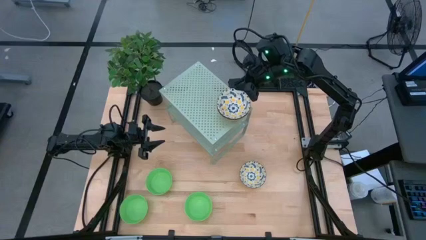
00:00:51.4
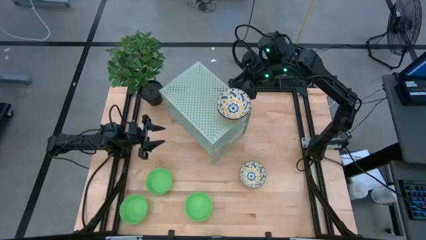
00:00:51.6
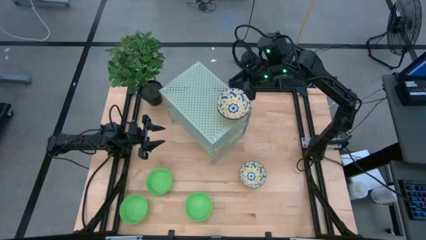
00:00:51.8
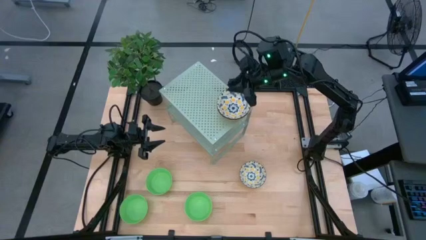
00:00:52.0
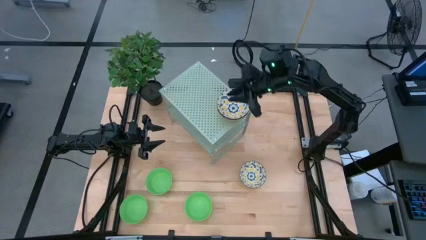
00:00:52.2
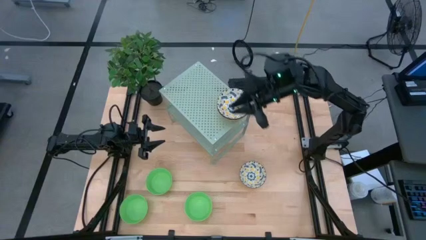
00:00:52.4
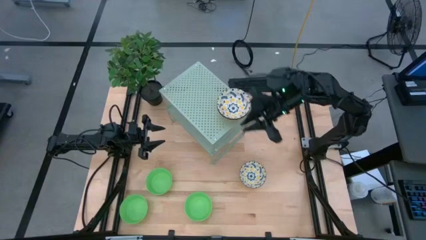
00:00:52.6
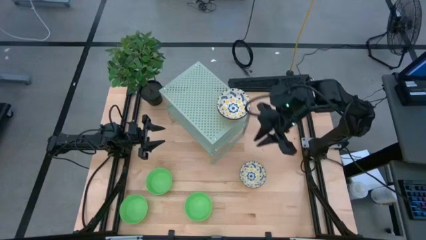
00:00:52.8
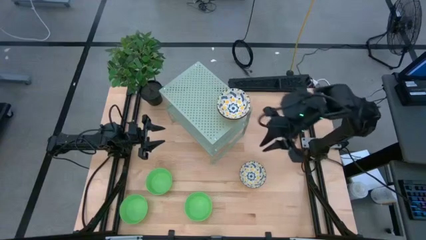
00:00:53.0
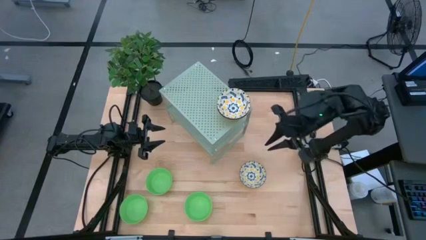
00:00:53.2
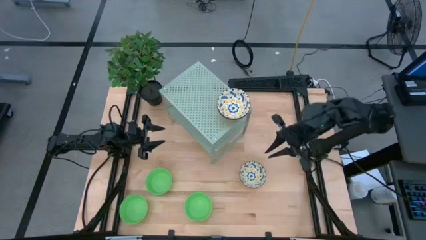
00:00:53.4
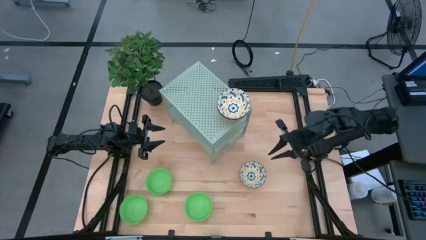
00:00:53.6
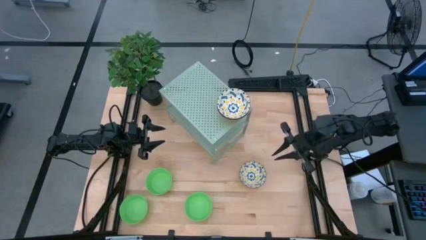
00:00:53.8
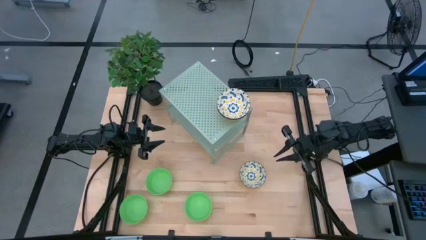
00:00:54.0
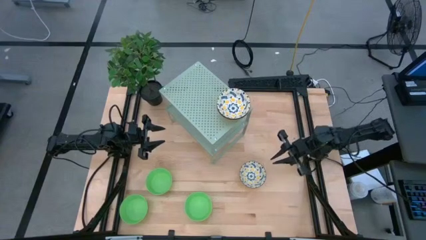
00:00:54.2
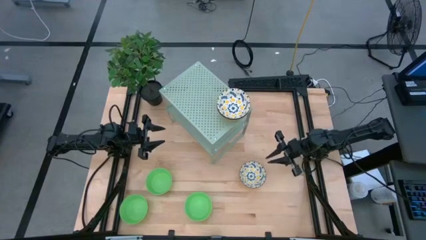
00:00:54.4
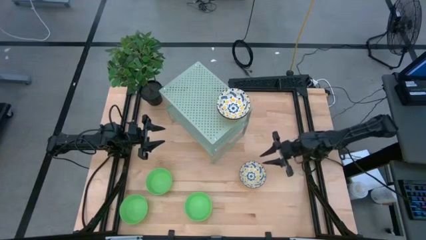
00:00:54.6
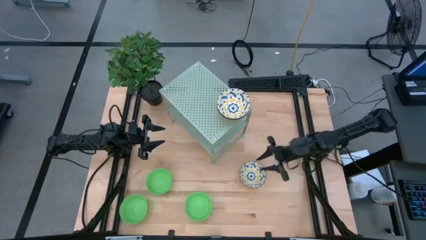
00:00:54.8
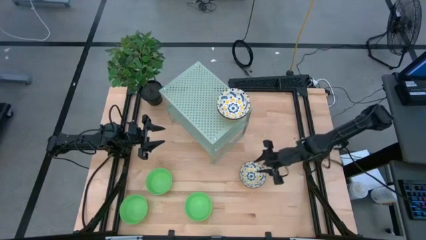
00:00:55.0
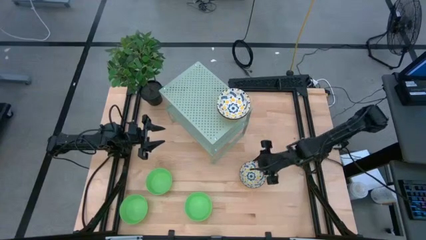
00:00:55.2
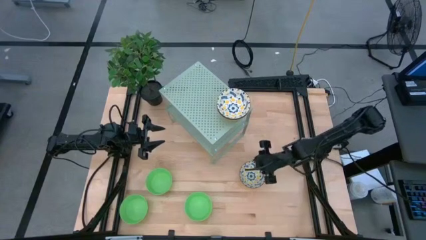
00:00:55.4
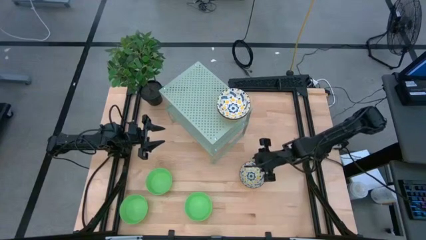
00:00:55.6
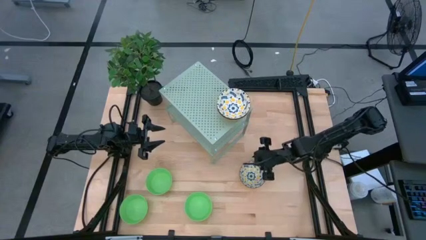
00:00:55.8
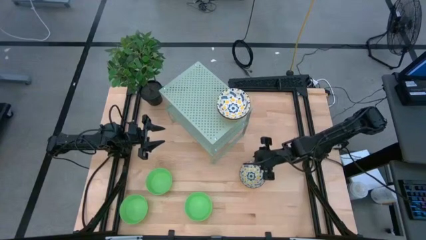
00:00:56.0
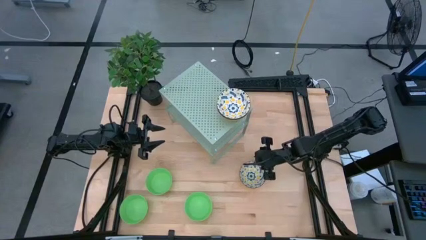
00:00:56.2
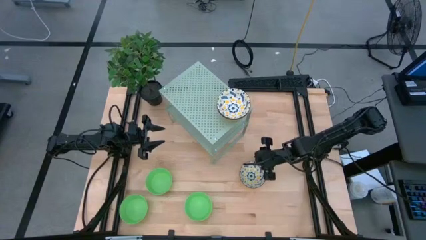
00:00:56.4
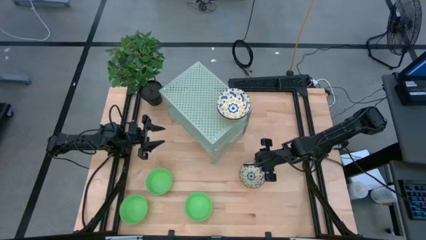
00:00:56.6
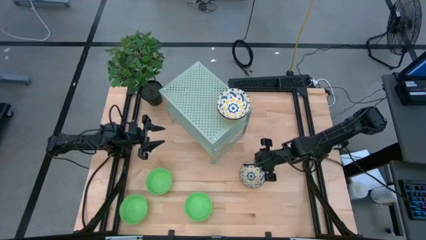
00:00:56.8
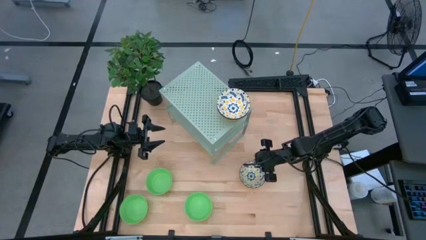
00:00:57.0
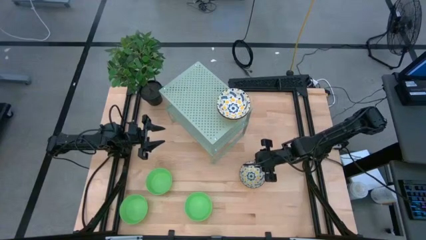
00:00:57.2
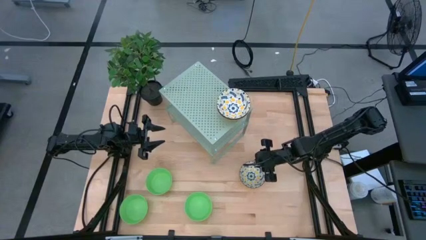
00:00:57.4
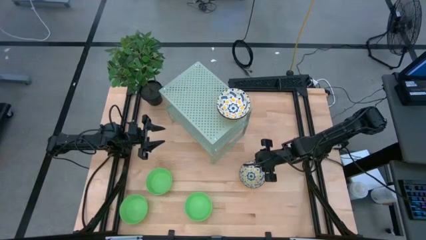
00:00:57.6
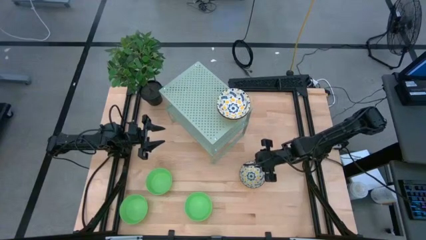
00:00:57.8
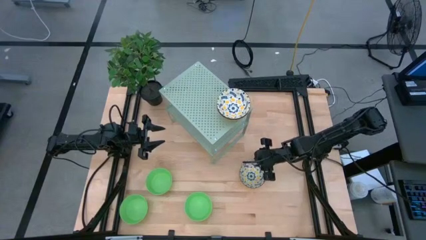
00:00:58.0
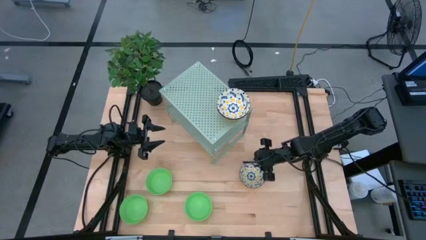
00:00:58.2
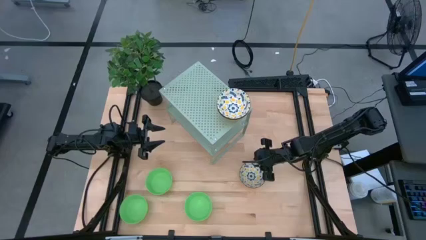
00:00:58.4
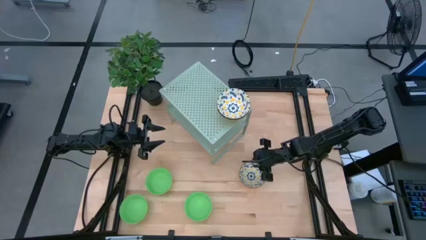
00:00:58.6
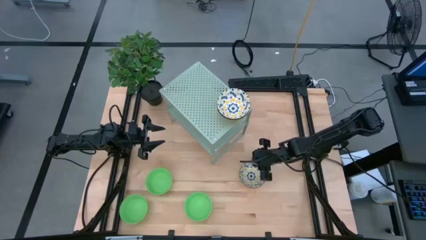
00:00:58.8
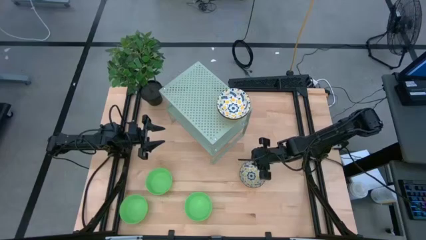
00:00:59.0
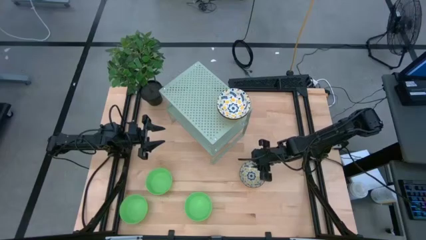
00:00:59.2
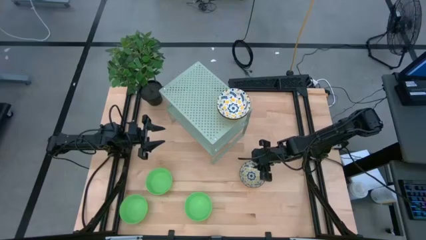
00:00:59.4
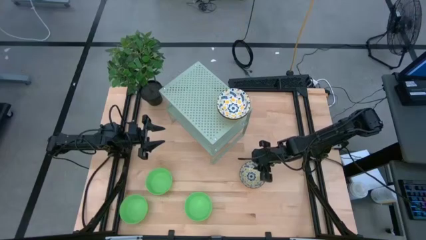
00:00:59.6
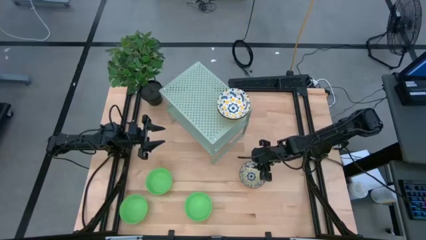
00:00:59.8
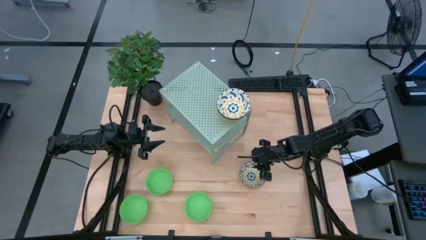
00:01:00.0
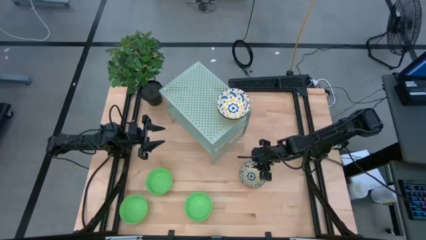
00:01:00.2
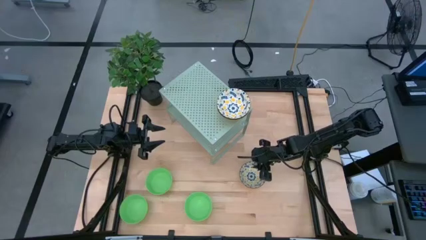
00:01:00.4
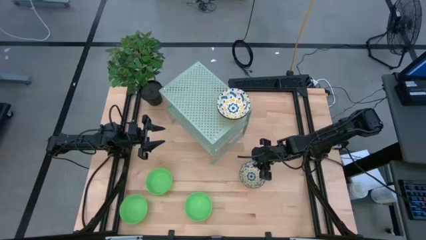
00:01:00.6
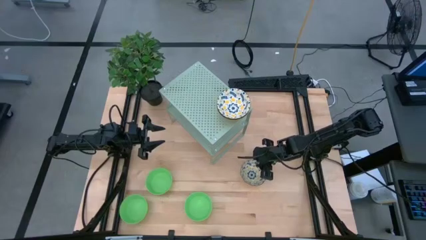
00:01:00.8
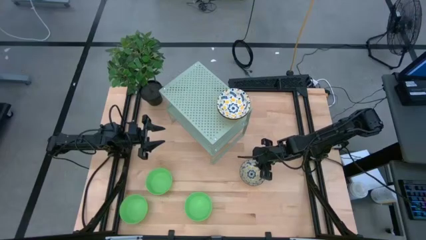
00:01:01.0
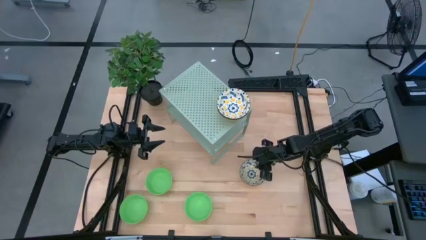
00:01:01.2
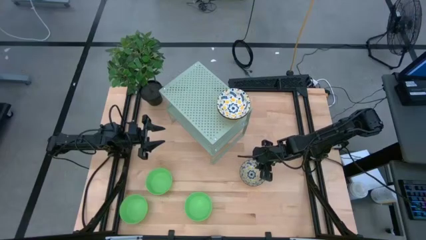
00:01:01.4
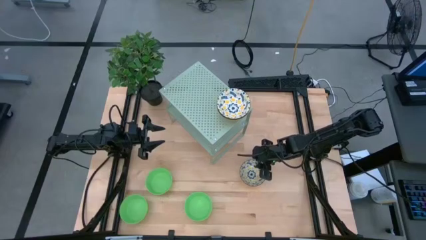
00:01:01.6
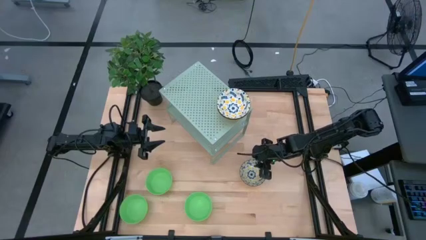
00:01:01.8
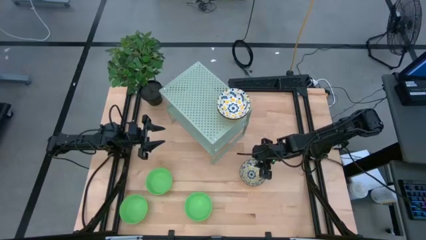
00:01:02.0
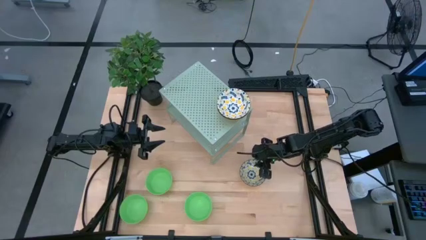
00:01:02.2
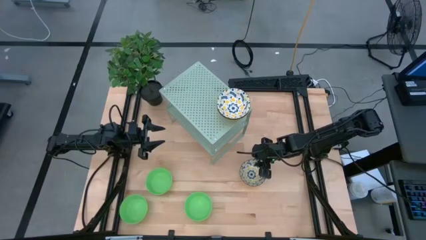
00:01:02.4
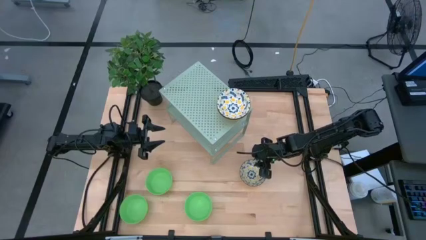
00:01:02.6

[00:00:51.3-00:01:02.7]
Task: Pick & Place Mini bowls
Stack the yellow patterned bowl on the yellow patterned bowl on the shelf

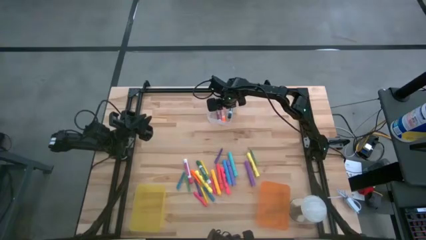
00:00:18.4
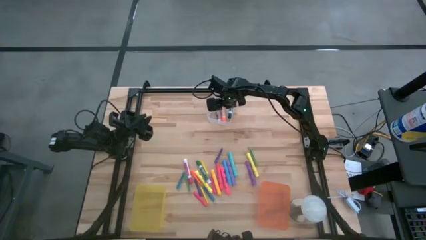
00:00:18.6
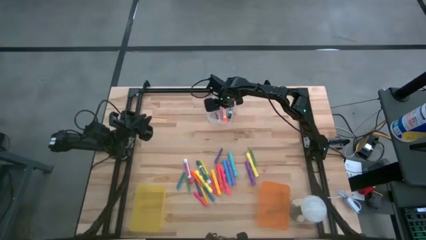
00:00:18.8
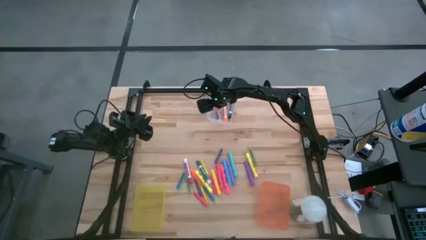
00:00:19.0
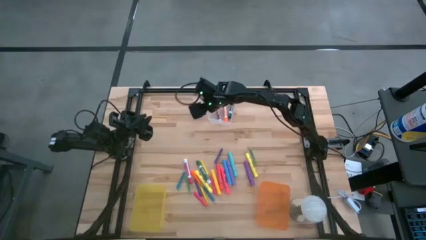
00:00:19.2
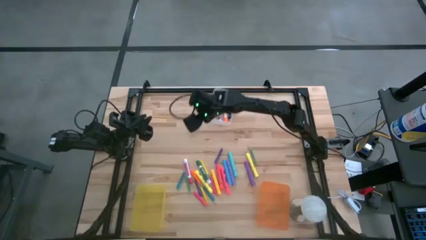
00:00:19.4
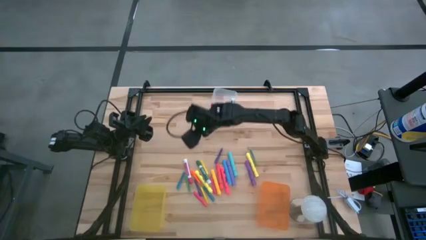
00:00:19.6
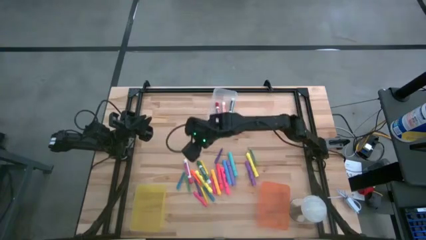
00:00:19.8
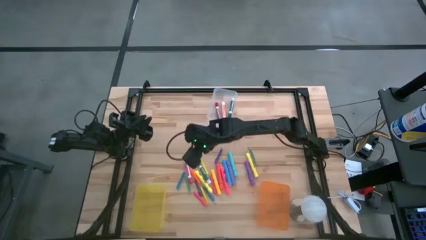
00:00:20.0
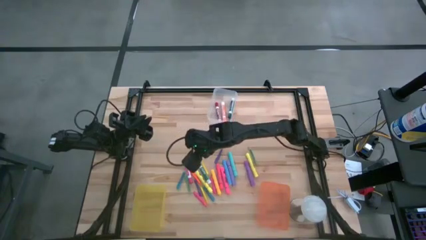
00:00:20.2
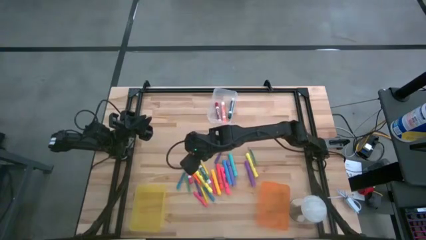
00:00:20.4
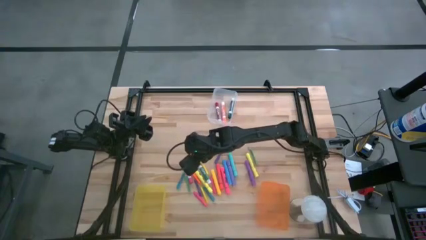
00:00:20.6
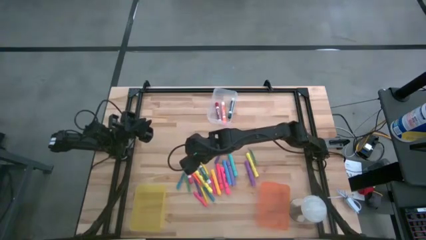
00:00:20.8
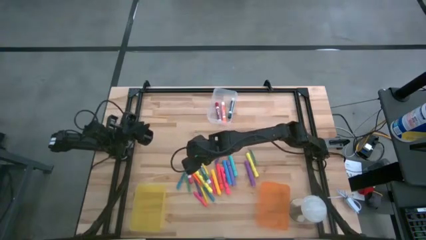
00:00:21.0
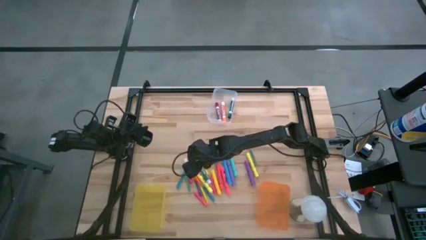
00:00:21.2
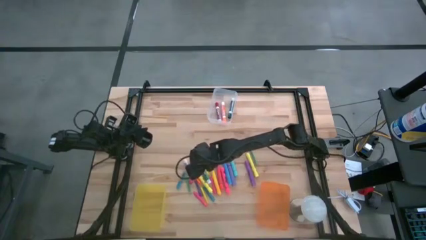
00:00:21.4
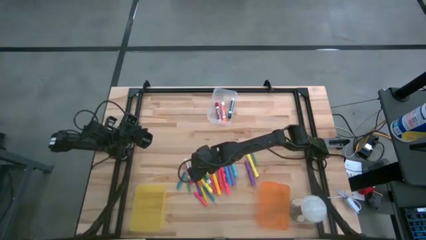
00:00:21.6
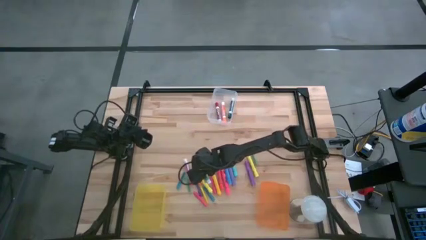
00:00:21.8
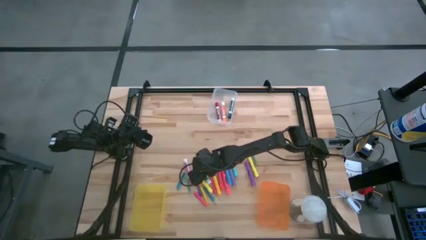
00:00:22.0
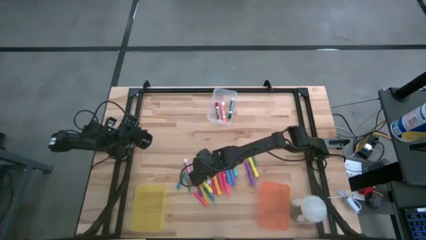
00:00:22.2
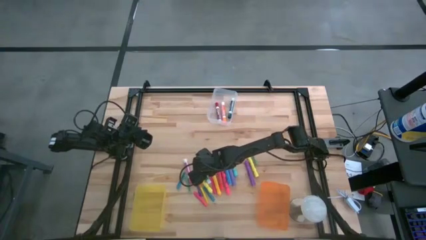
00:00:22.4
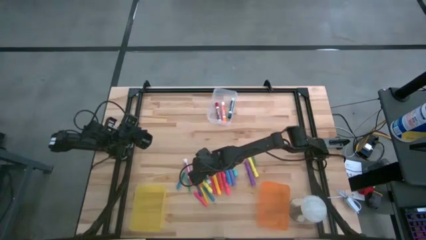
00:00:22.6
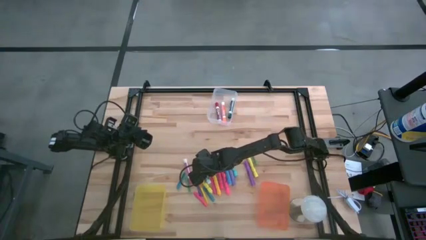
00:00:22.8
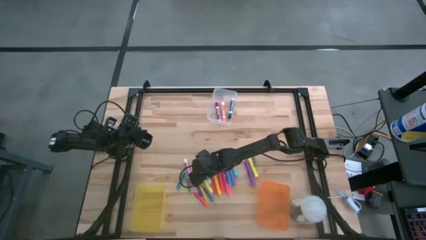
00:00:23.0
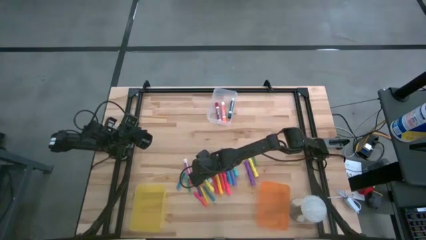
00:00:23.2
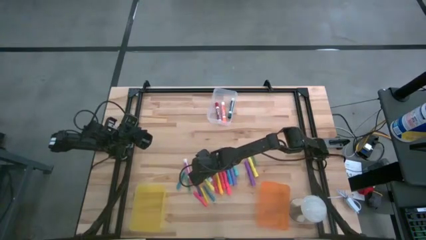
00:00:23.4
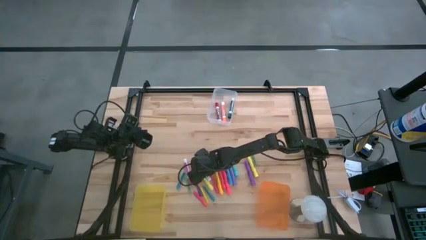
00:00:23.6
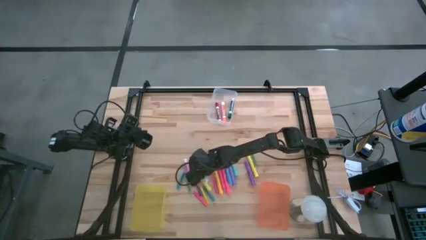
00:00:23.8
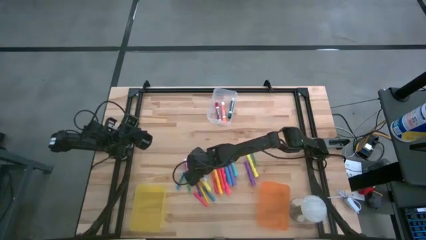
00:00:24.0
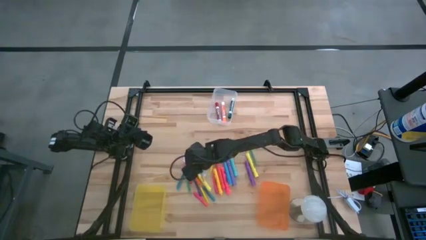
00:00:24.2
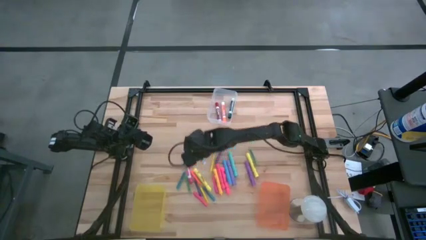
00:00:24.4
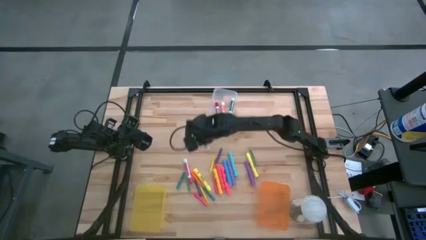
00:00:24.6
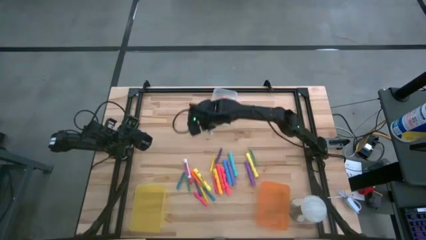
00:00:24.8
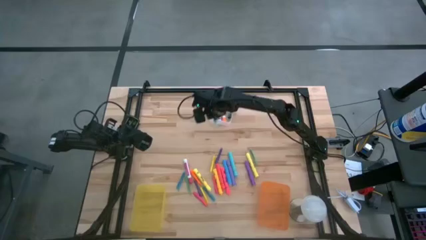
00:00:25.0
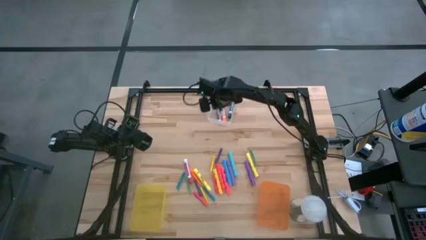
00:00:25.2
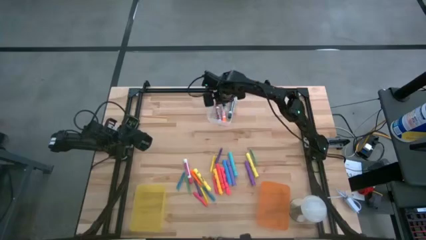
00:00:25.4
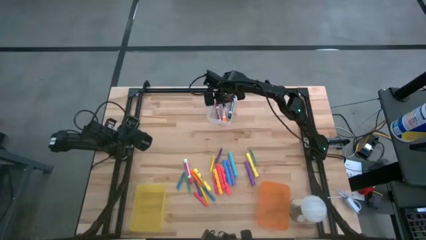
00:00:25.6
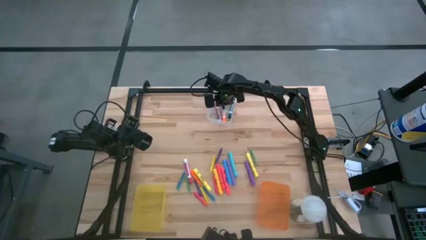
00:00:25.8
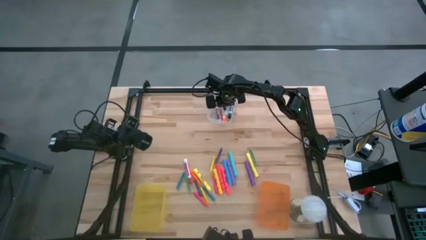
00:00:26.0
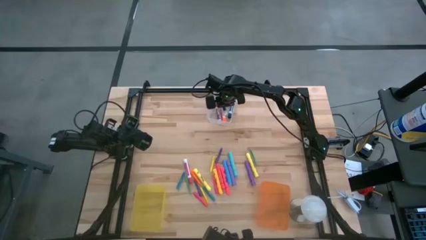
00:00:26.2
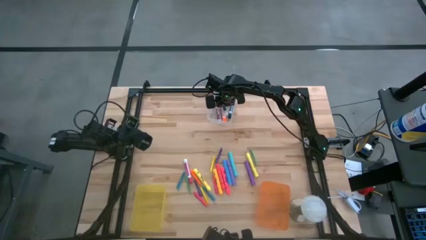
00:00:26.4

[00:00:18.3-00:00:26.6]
Task: Pick & Place Markers
Put the green and white marker pen into the white bin
